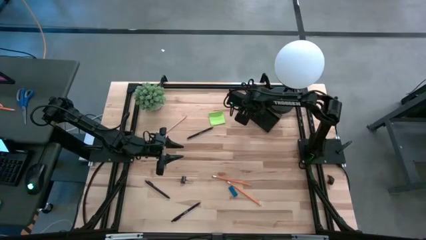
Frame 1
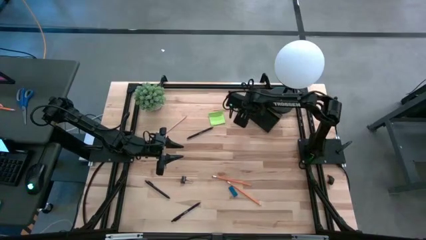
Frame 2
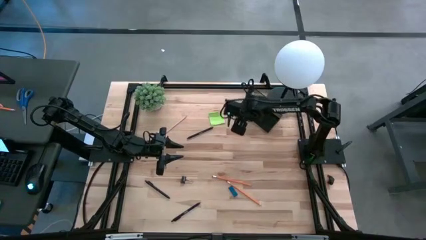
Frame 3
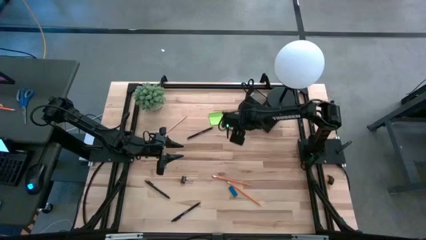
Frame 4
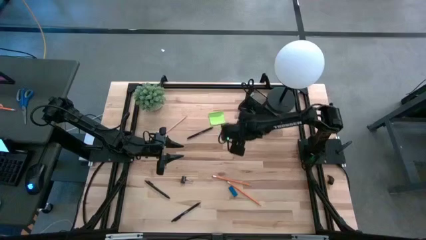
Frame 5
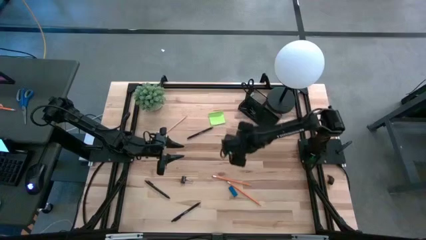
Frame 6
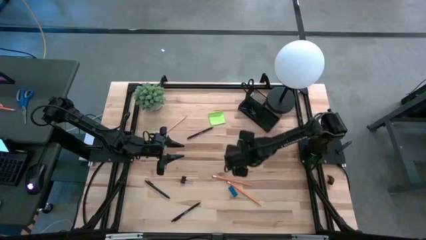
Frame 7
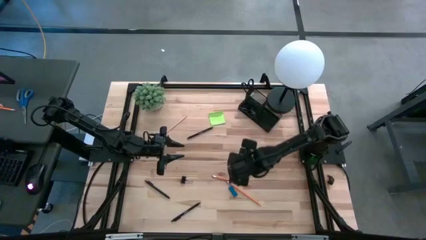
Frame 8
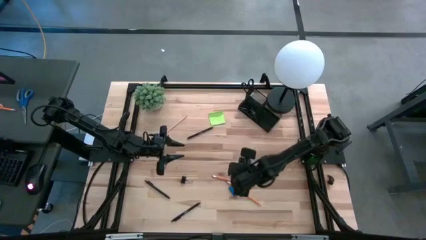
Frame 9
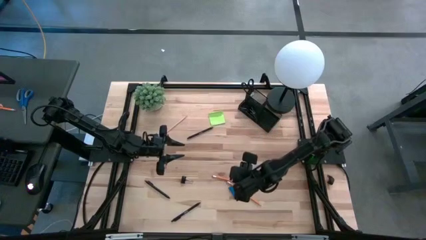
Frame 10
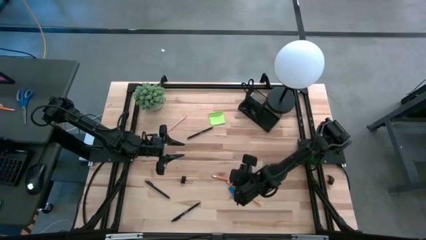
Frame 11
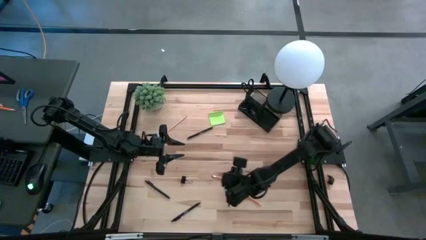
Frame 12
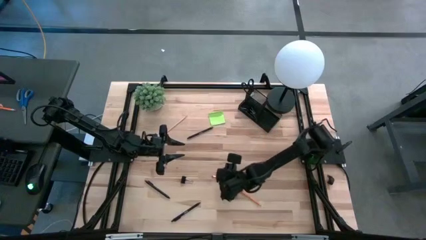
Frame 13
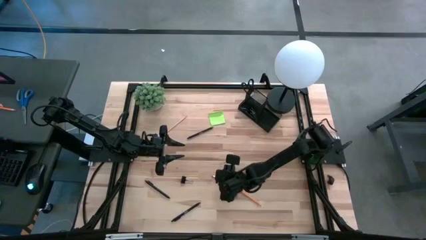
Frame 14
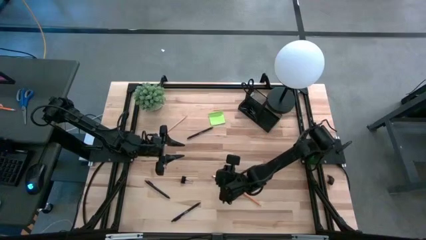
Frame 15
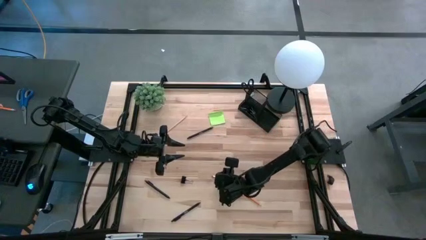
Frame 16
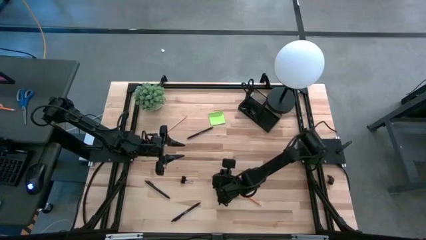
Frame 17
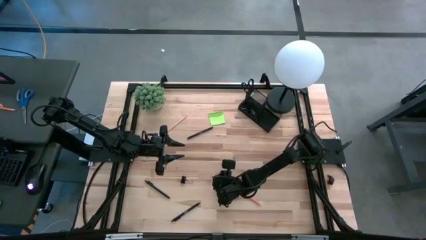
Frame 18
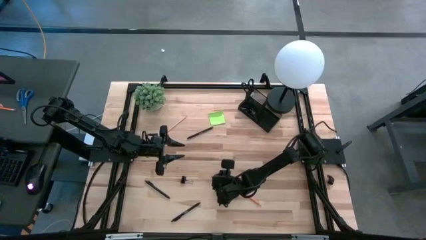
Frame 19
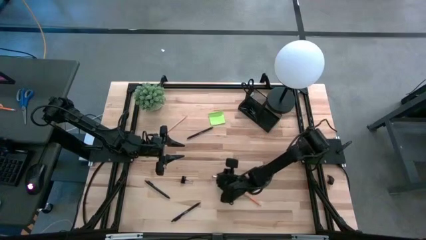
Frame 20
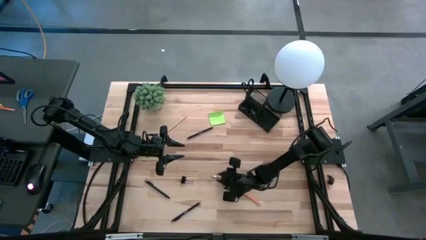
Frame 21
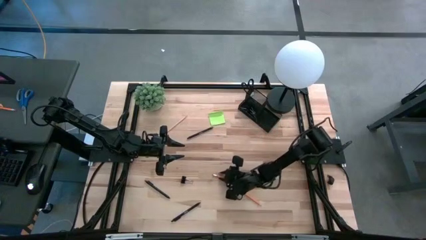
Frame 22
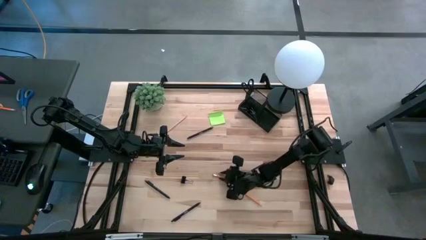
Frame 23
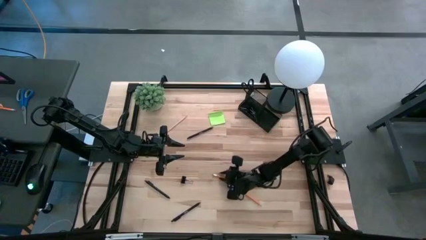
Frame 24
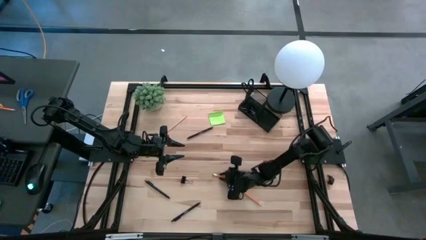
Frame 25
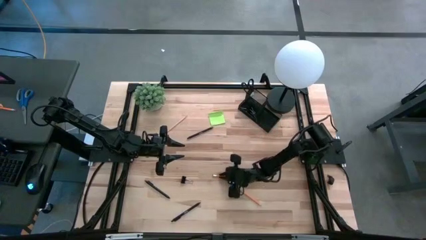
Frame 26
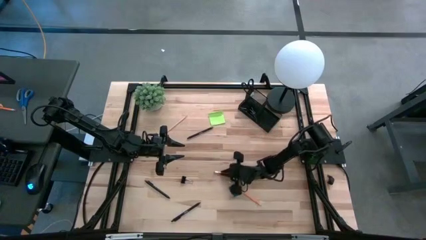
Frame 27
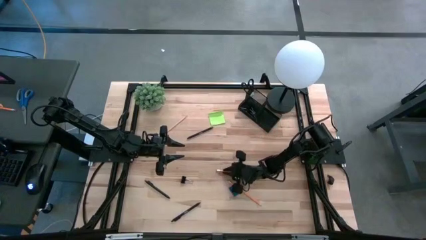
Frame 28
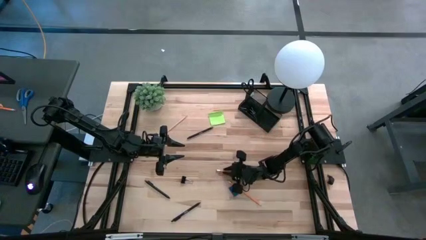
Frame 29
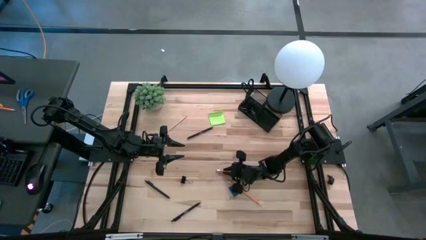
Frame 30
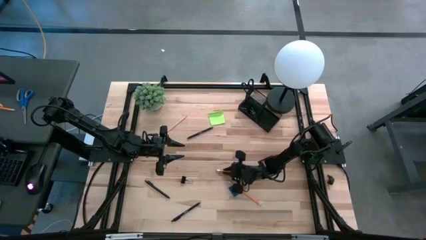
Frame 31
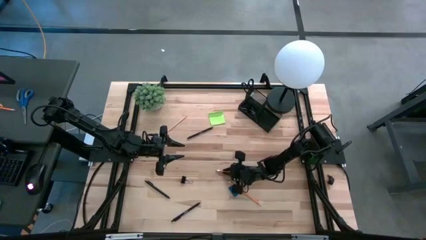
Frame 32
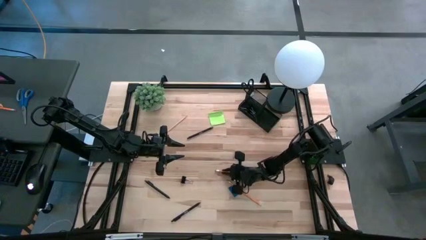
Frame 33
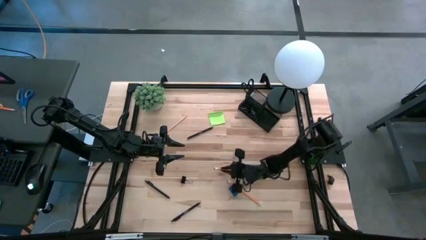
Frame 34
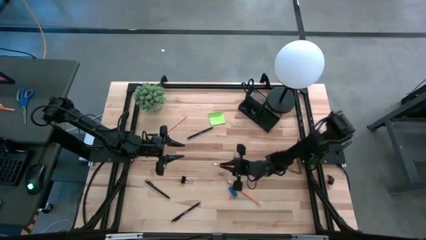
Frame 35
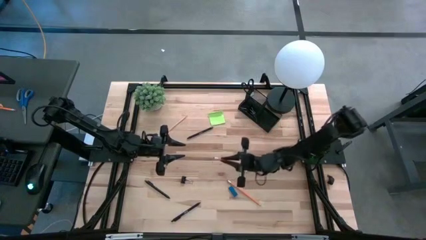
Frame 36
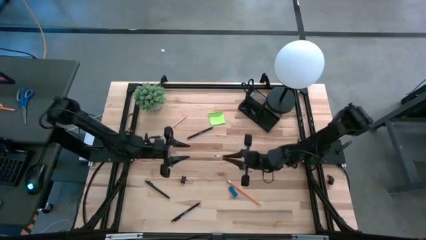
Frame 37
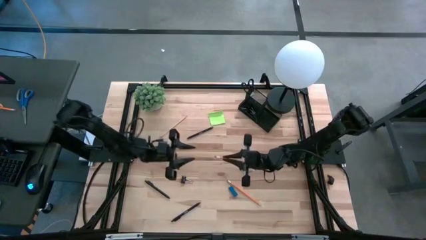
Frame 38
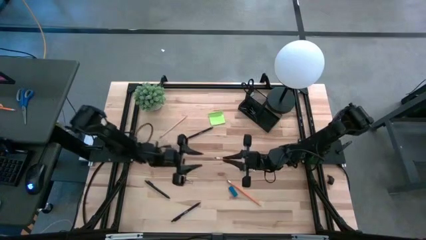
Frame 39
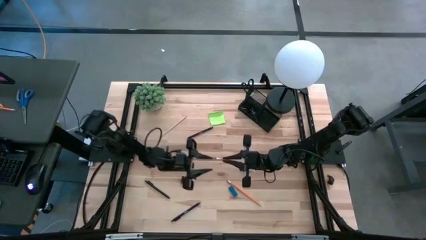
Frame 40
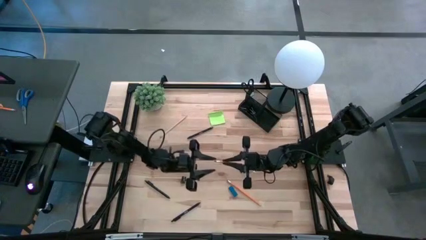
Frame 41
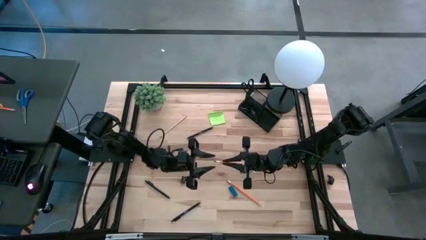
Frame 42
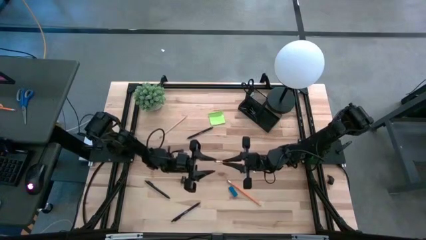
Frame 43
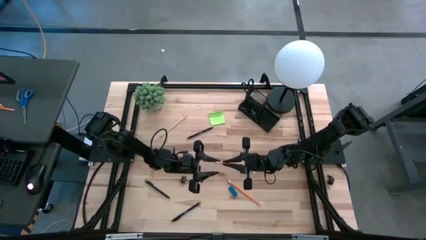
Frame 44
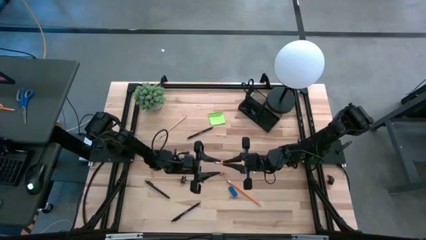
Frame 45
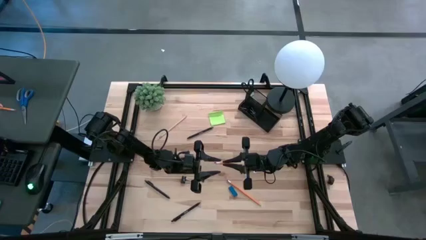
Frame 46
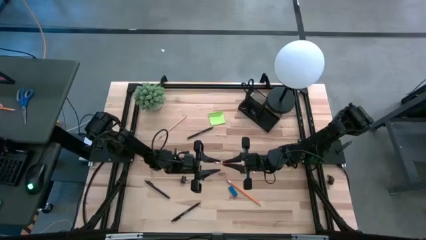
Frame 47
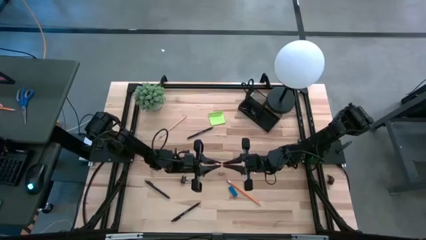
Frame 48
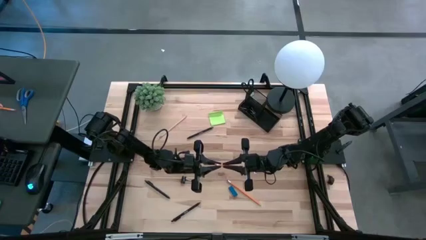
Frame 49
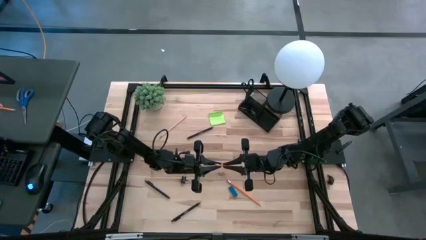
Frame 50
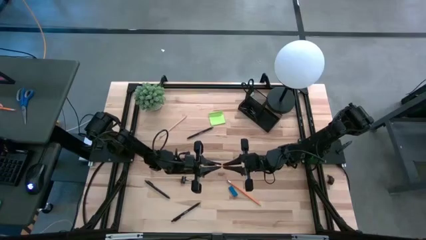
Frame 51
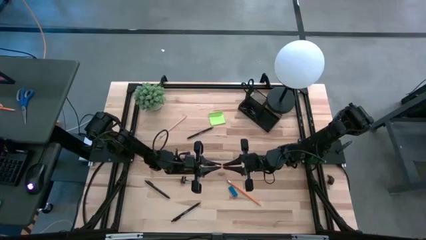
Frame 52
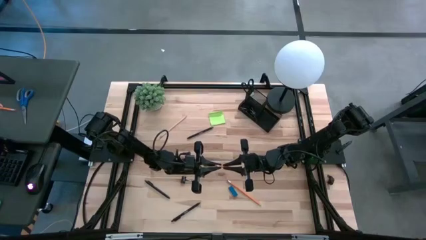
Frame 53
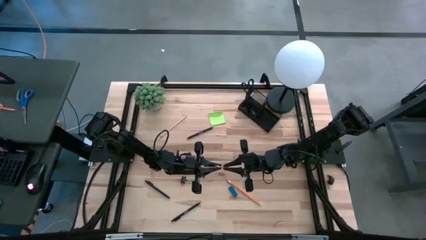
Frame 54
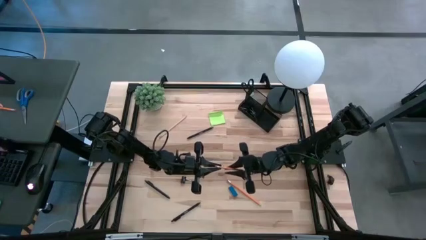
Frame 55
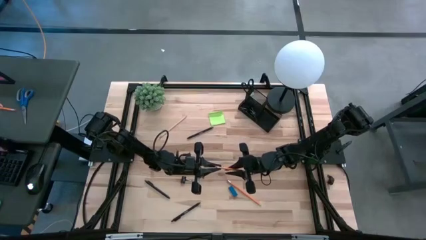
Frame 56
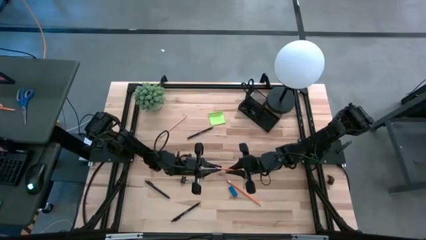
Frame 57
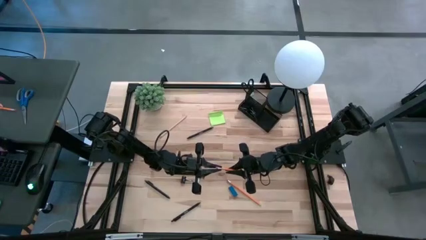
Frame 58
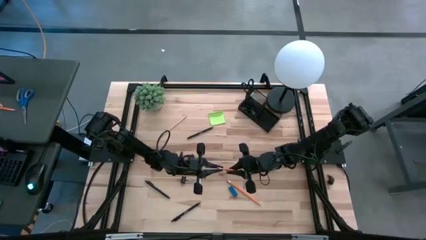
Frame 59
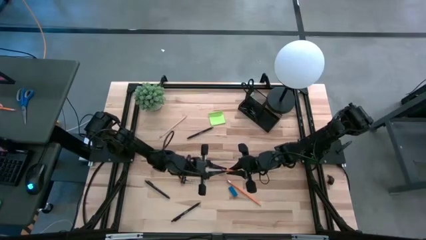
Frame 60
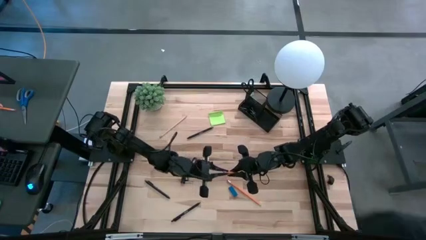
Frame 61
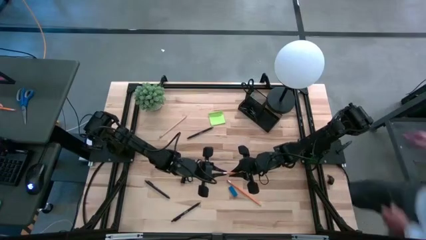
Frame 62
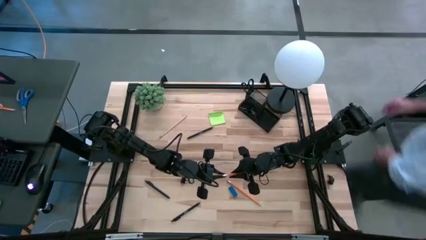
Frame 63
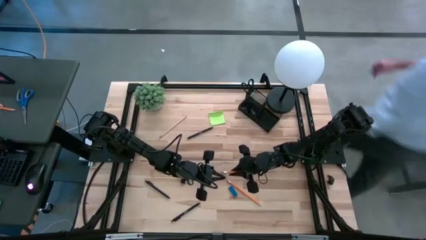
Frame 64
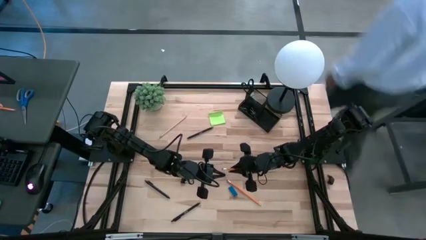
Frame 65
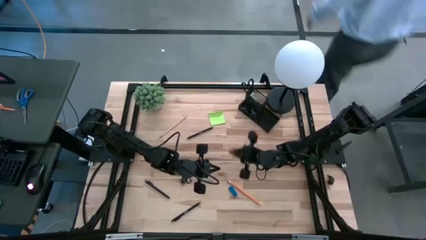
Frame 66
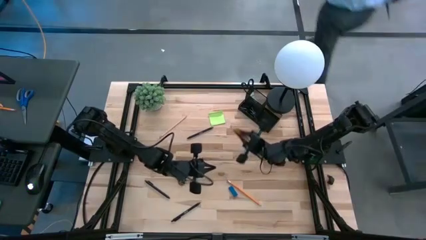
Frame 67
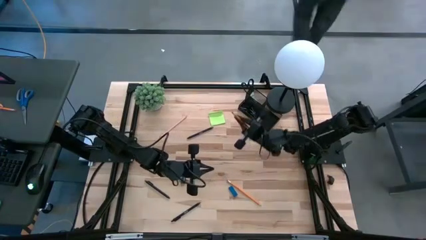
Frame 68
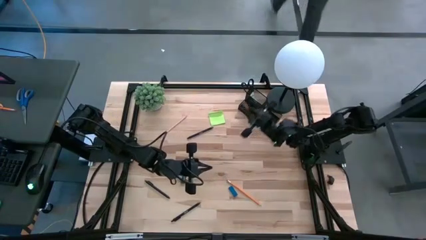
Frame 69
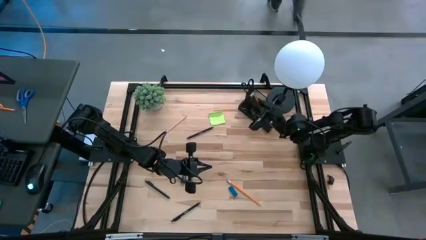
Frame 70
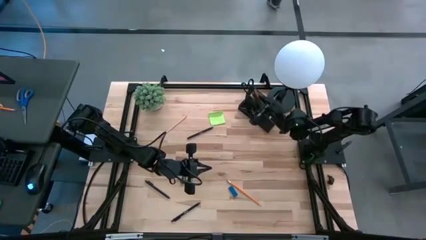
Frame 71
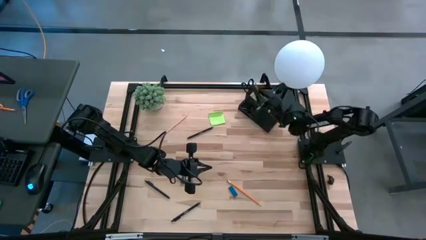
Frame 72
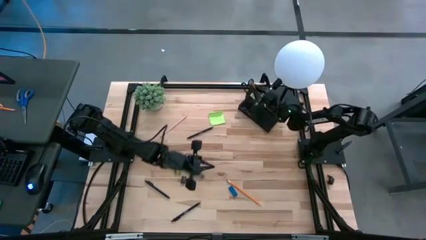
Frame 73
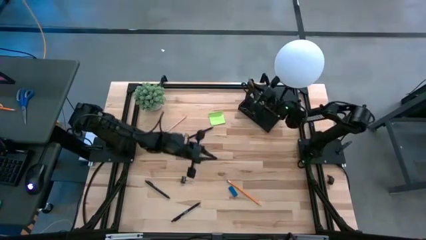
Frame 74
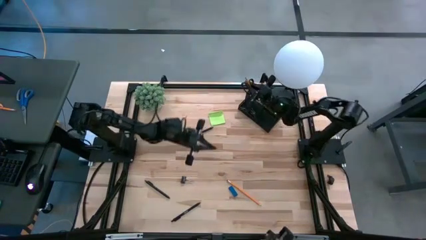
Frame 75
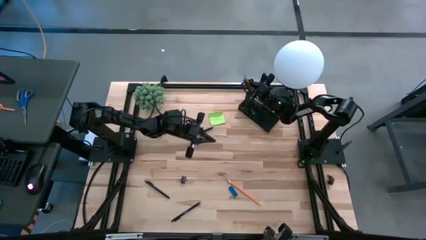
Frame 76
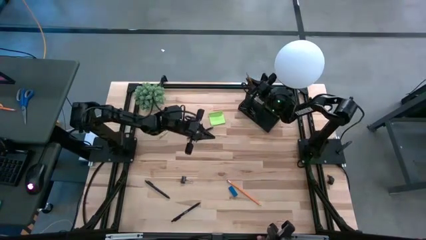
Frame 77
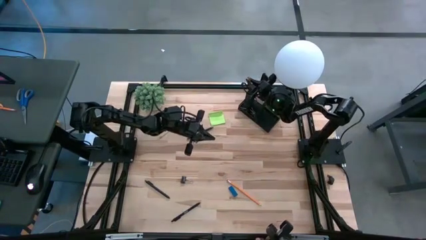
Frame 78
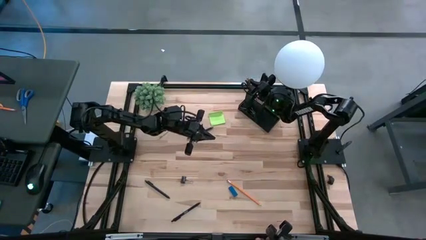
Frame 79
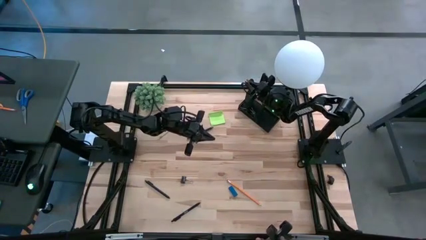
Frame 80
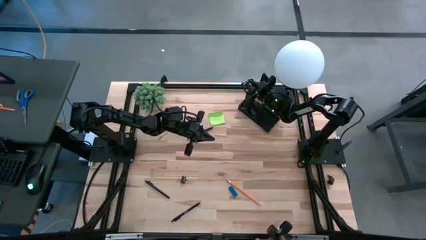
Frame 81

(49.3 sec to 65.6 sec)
Task: Pick and place office supplies into organizer
Put the yellow pencil into the black desk organizer

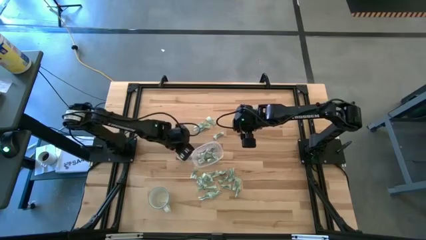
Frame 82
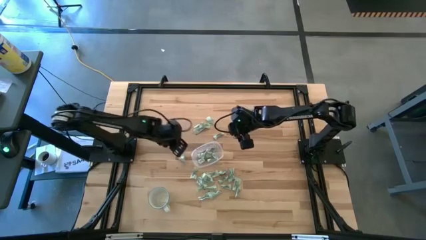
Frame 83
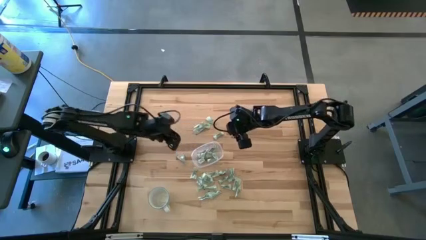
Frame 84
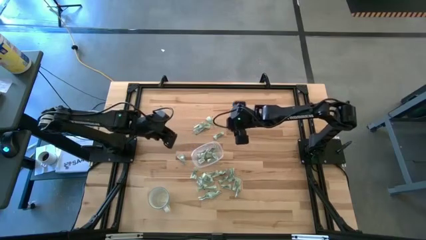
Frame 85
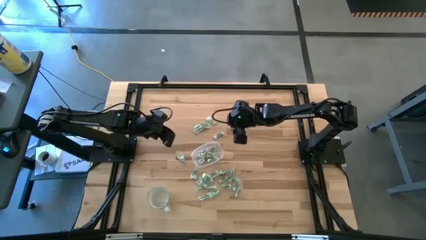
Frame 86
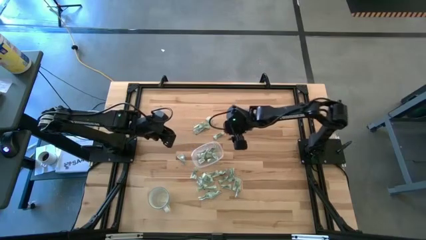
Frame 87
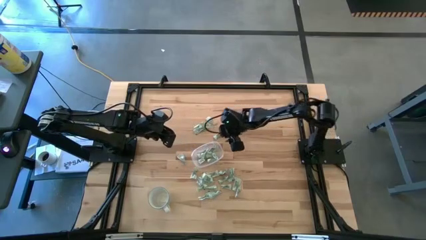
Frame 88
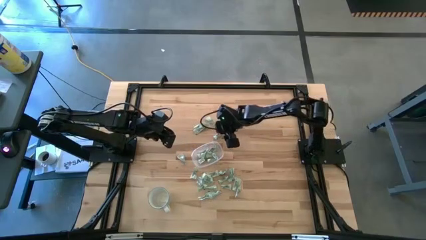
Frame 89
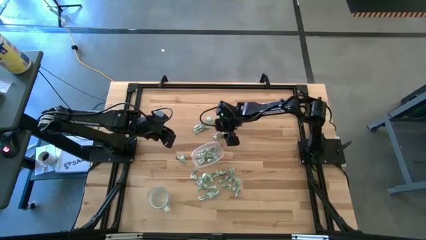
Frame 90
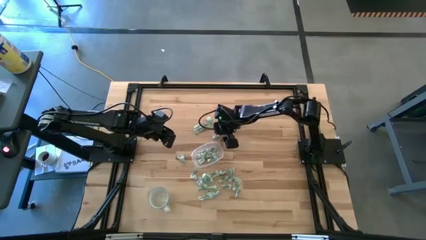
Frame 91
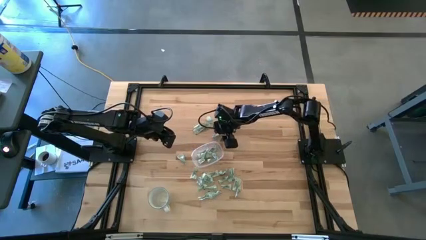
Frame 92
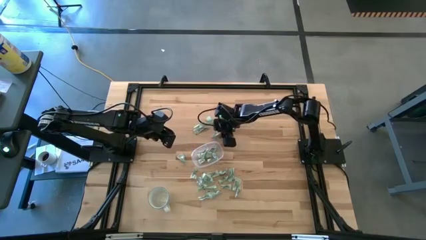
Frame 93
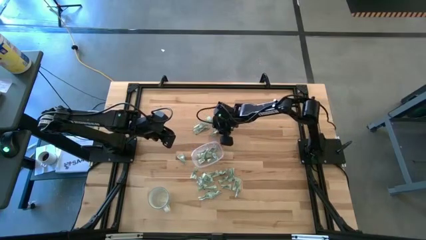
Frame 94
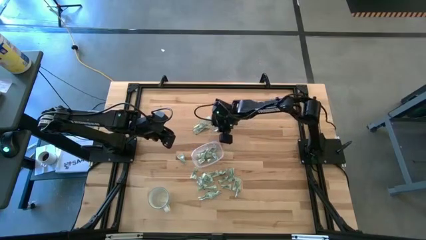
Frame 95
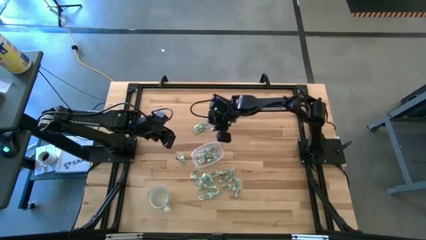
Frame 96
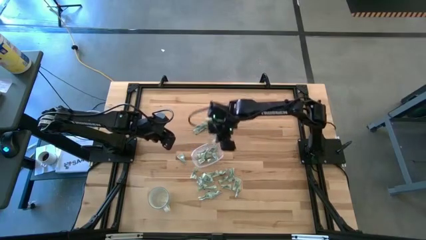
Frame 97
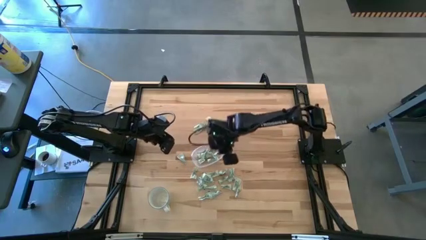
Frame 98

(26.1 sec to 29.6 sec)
Task: Pick and place Stevia / Truvia into bins
Put the stevia packet into the transparent container
